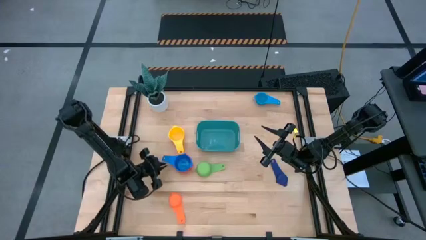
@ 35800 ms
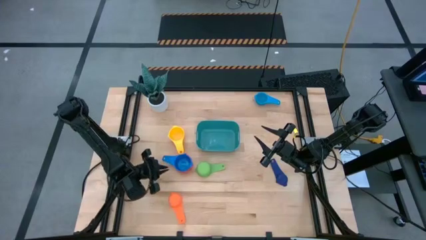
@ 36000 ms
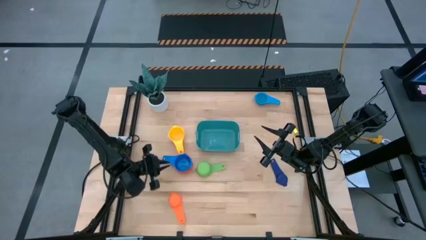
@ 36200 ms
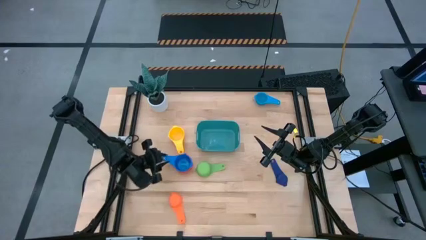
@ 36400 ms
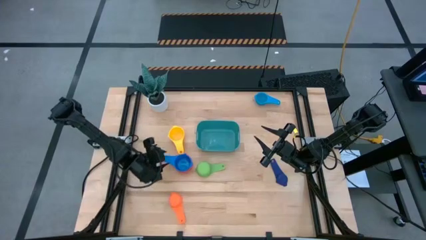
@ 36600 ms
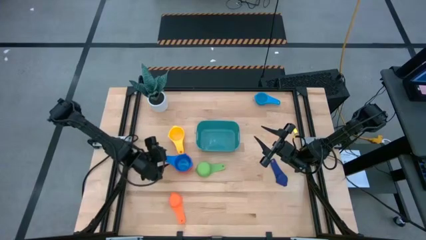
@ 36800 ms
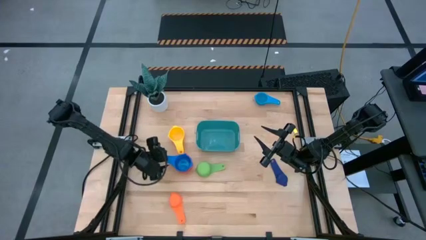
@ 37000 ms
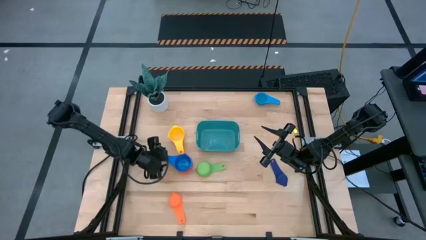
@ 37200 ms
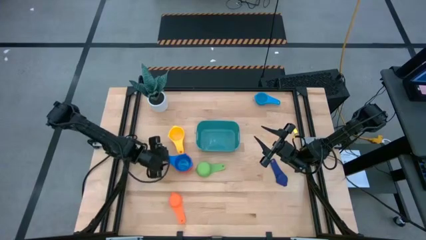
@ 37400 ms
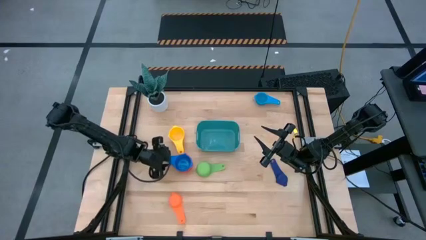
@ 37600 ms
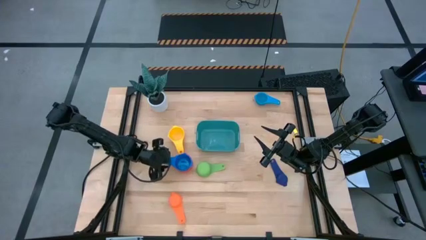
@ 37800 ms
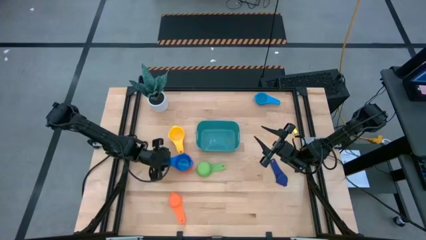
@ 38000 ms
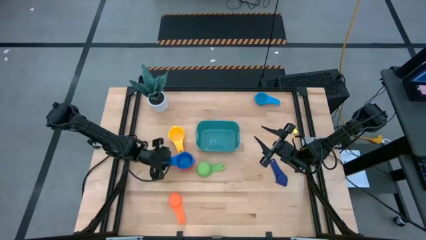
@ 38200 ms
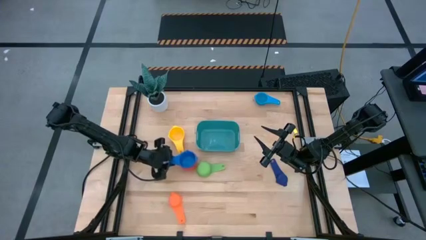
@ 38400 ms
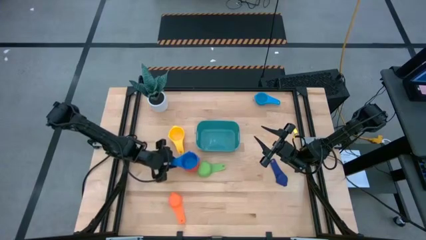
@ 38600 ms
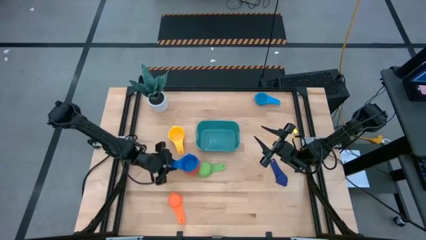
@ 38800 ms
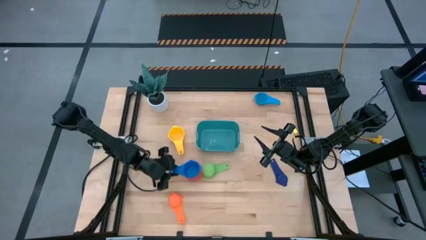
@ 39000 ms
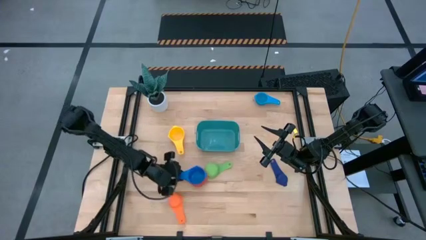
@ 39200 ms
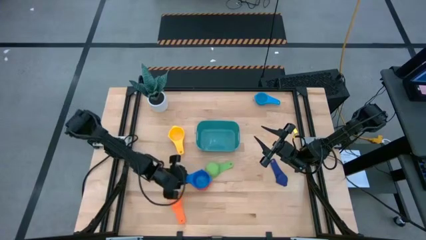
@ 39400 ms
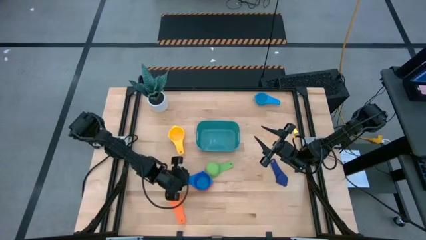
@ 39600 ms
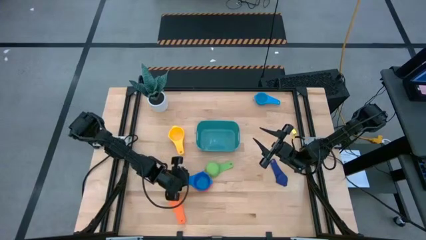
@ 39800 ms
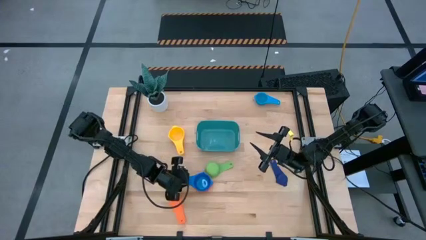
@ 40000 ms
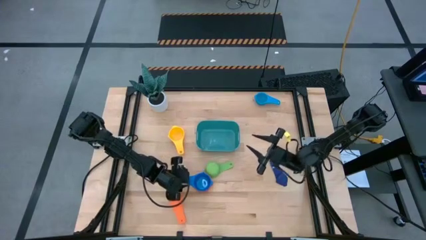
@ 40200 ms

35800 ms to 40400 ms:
Task: Nest measuring cups in basket
Move the nested measuring cups to the center of the table

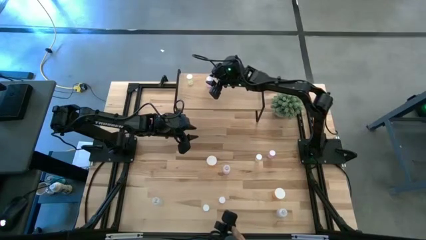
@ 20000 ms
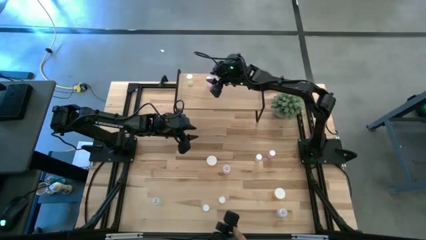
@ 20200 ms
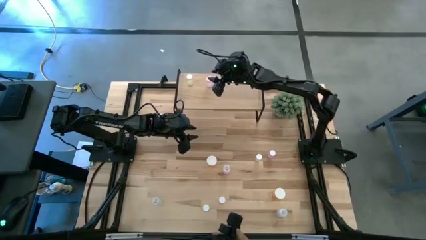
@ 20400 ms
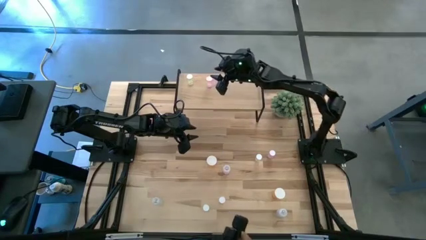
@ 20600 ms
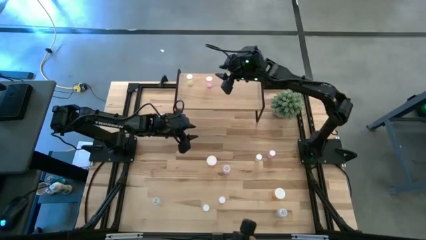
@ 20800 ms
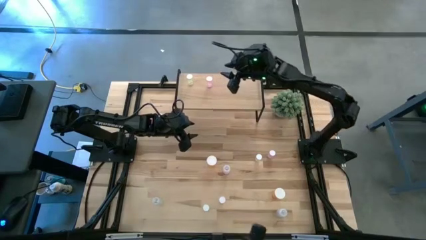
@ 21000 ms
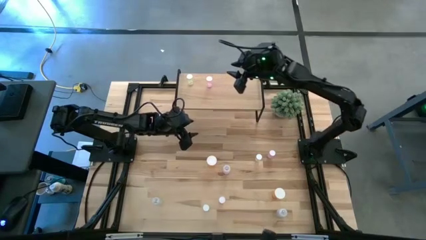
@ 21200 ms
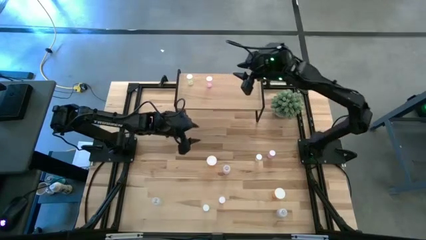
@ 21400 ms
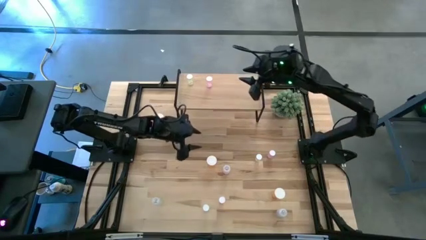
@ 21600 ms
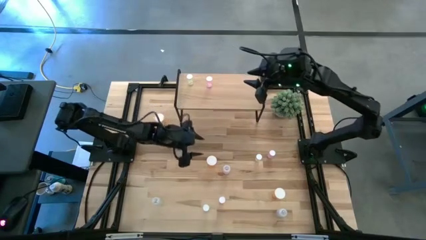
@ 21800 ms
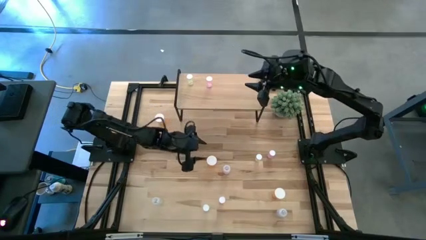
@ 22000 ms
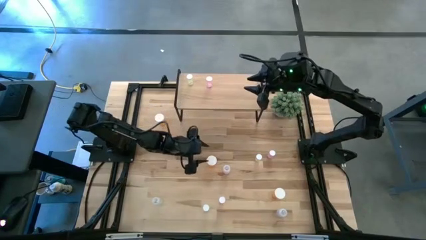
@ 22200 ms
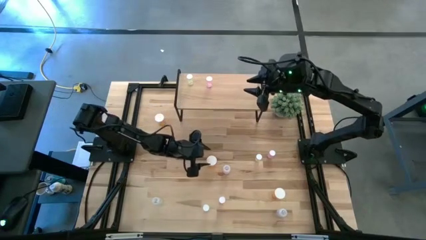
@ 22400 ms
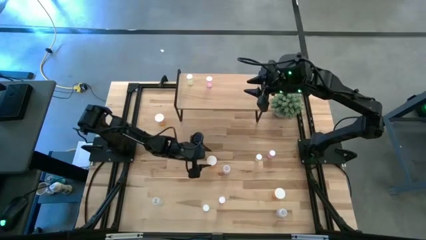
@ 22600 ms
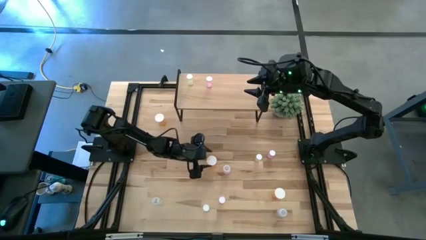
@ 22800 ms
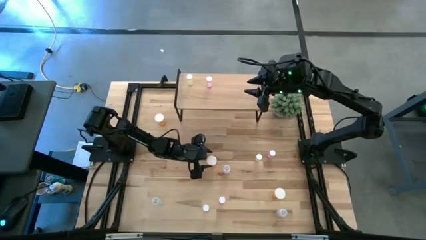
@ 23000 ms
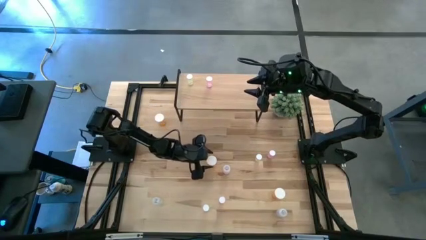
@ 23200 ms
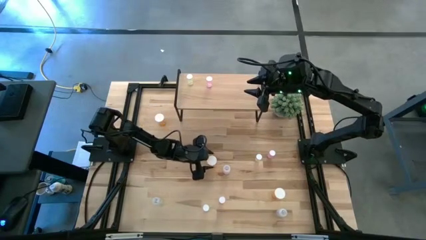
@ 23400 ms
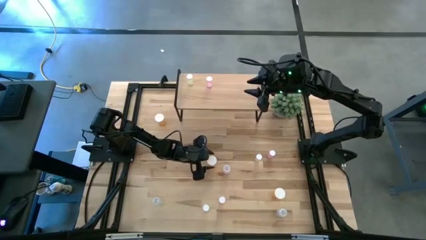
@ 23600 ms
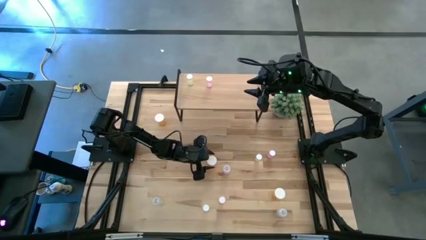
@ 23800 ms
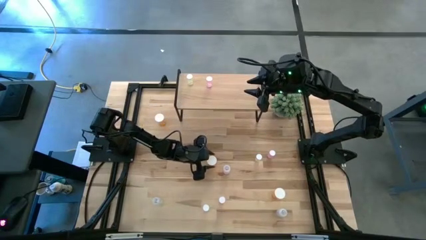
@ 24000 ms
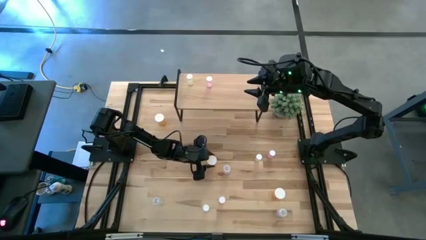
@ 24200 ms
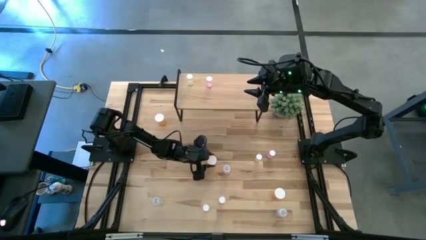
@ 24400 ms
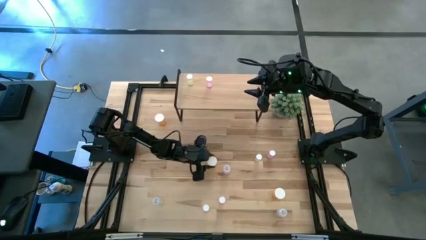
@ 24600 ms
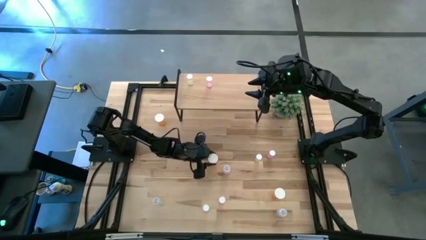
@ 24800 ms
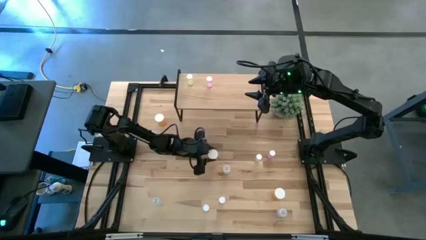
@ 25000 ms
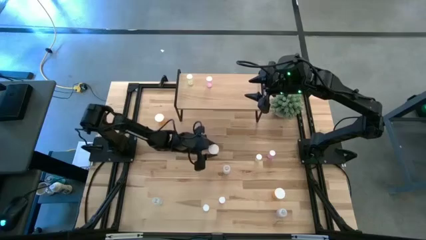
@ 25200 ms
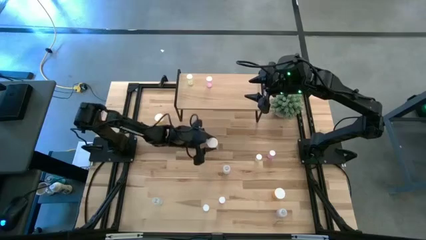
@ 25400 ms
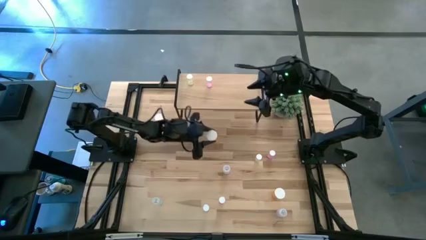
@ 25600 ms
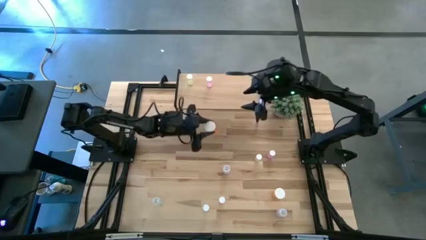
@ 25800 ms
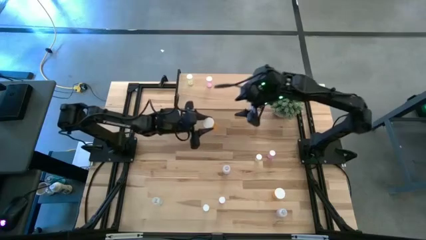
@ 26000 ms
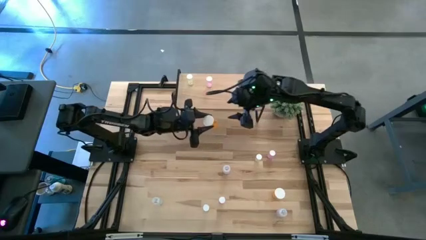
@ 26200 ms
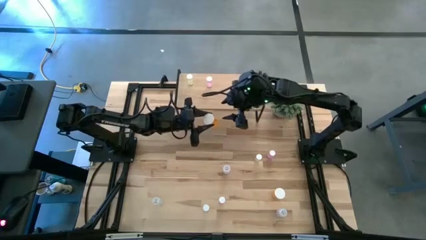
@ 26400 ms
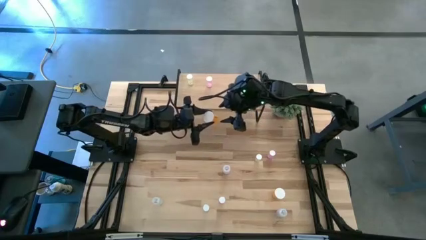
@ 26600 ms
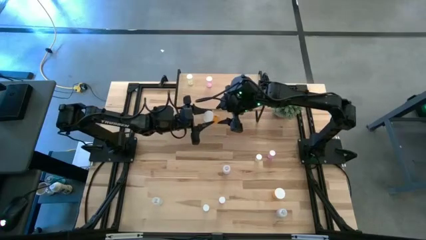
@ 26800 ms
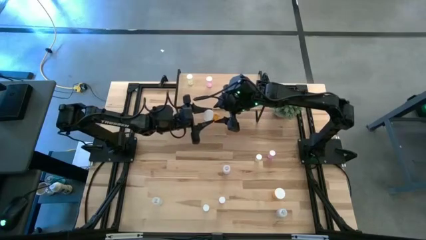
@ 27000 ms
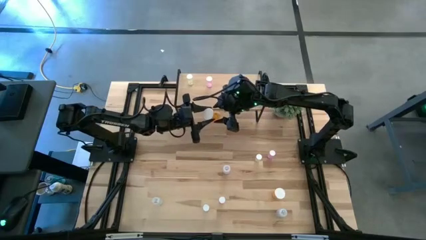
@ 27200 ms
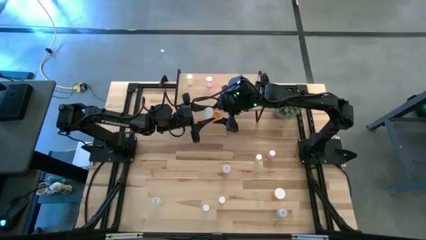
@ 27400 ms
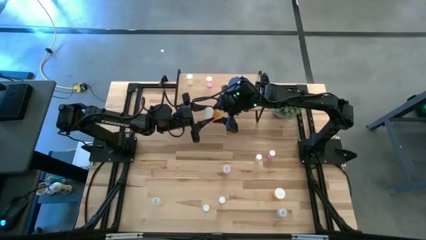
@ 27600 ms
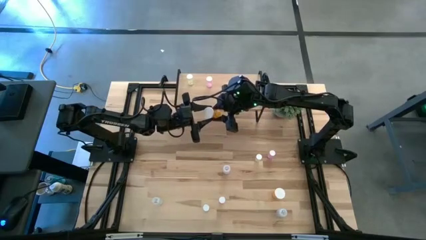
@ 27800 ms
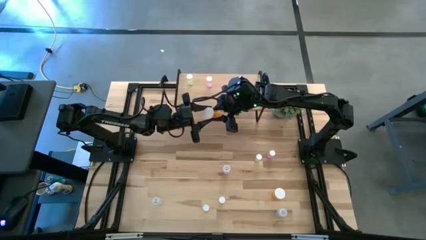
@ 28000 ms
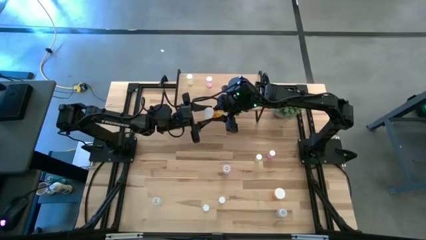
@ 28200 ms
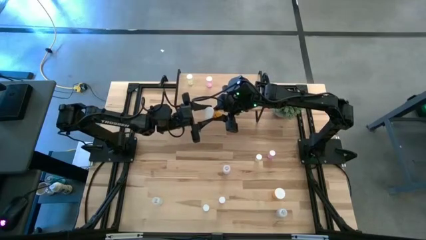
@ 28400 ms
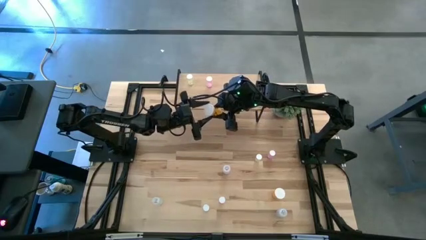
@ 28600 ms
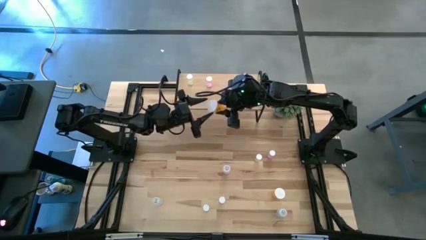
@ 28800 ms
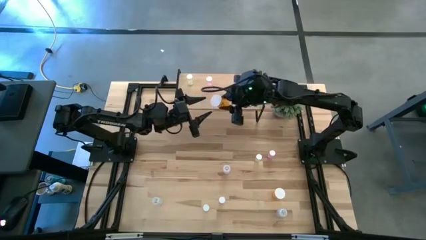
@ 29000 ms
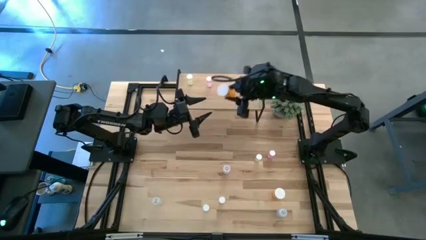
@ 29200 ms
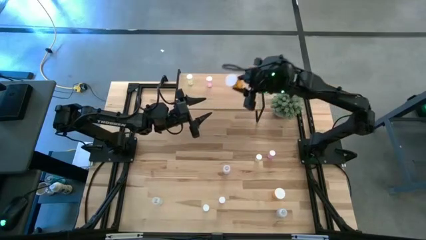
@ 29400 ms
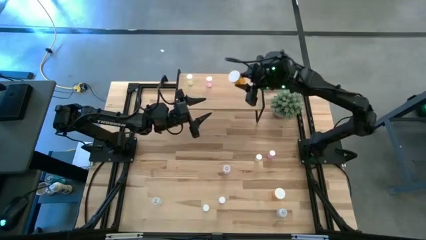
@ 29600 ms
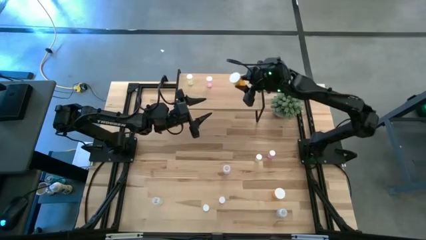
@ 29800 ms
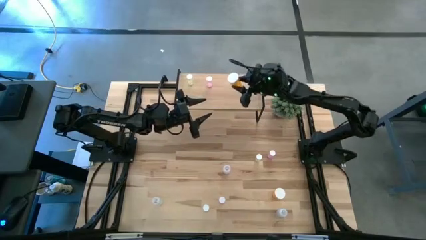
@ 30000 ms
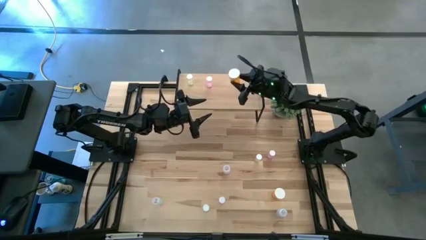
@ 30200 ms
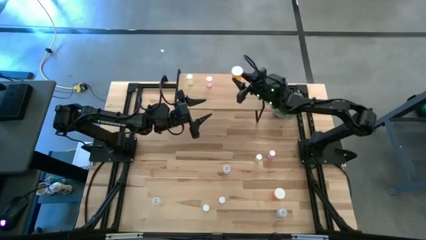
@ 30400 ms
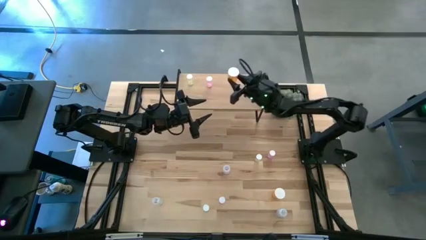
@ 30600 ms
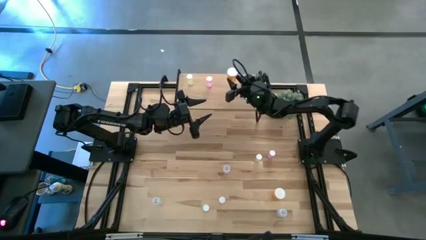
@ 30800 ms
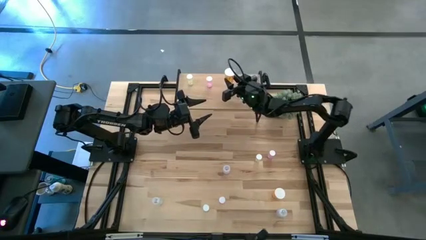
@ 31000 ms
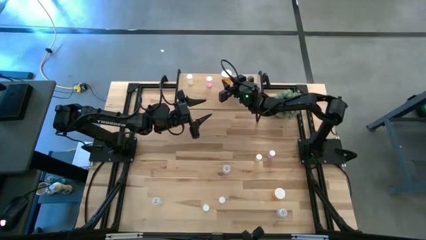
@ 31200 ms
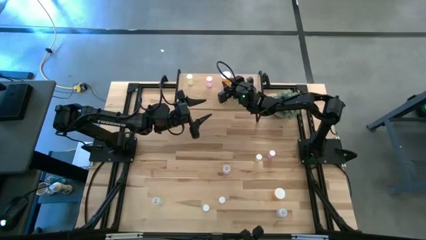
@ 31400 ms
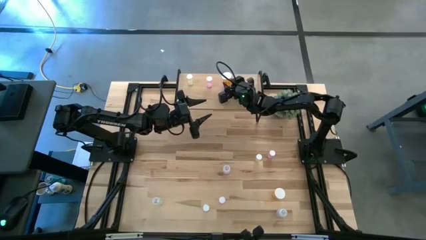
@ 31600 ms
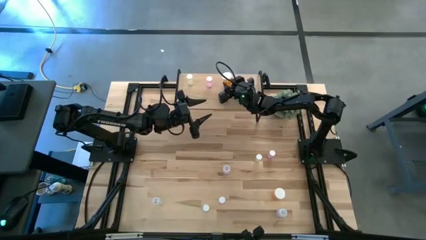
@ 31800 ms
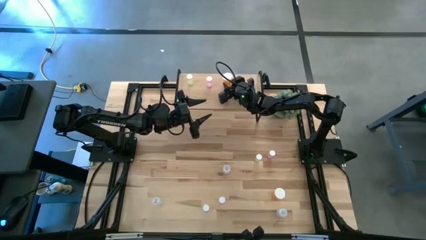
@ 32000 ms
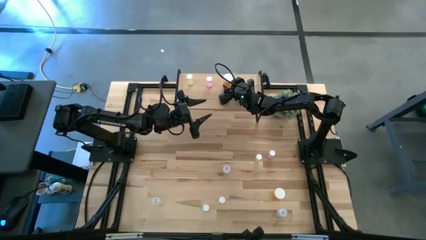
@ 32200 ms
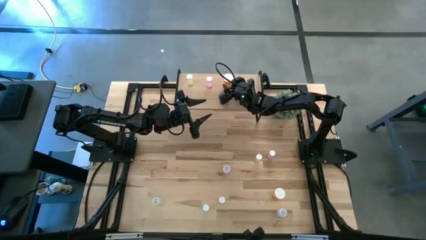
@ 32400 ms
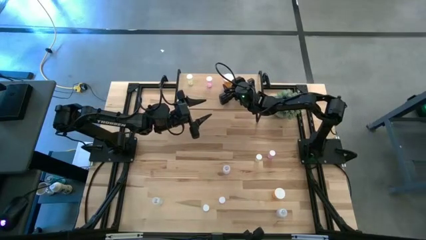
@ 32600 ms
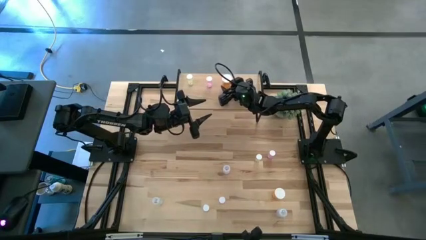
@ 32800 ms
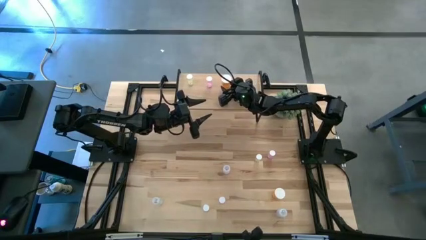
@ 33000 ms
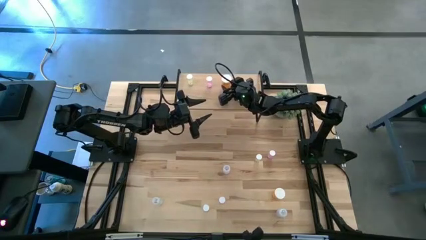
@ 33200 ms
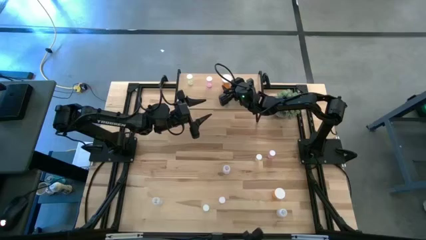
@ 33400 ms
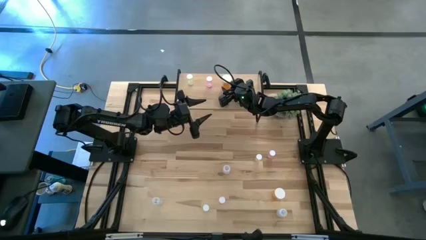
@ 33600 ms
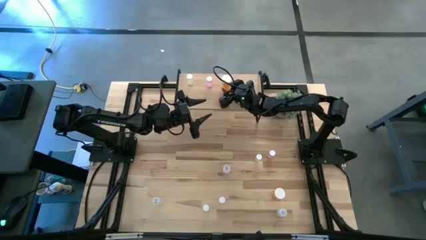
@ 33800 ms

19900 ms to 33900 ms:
Task: Pick and place medicine bottles onto shelf by color
Put the middle orange pill bottle on the shelf
